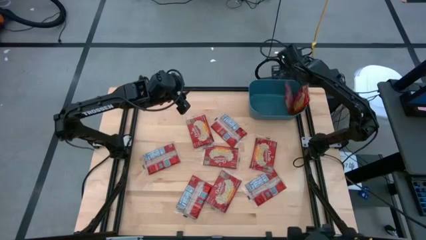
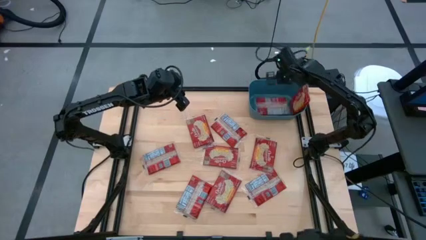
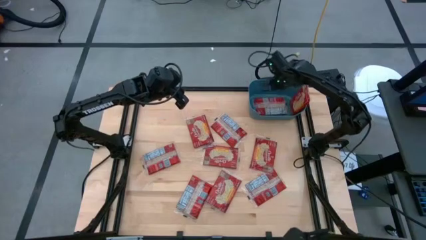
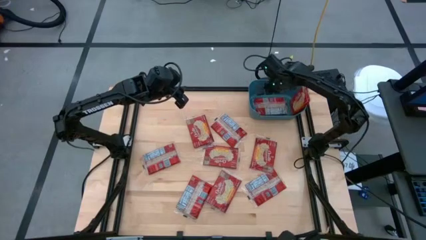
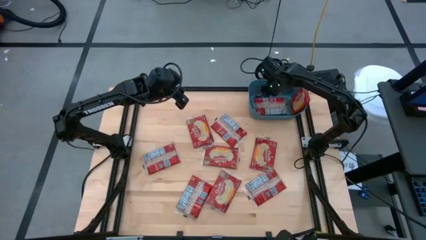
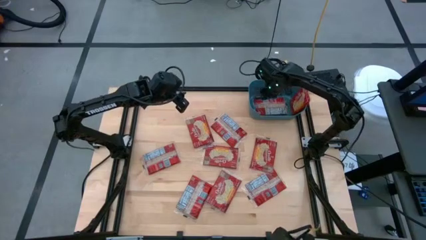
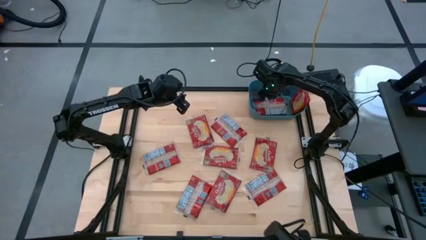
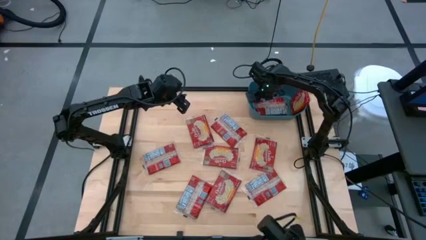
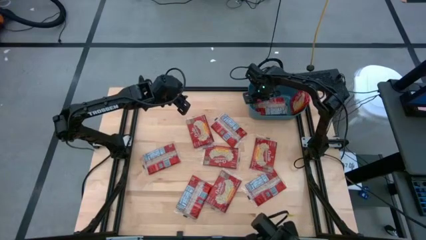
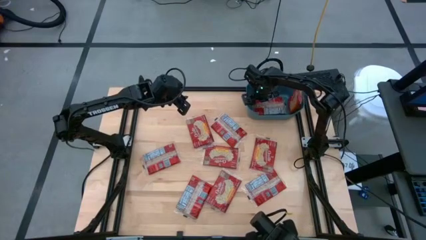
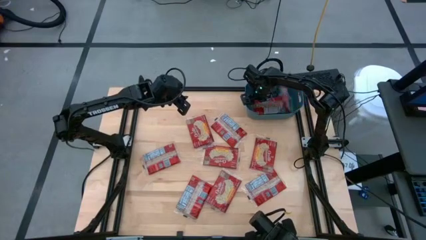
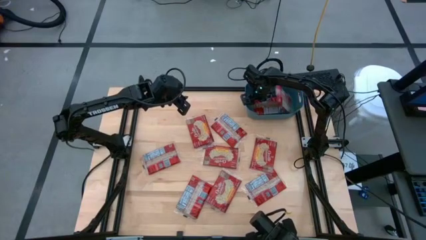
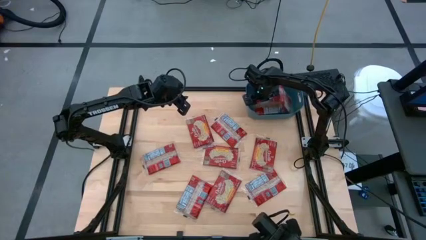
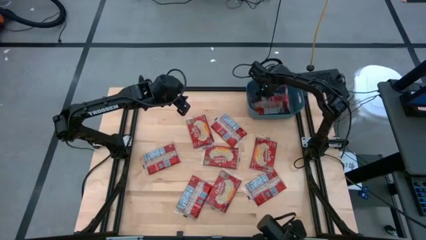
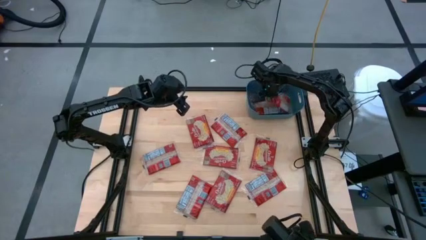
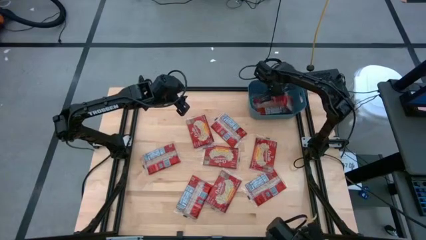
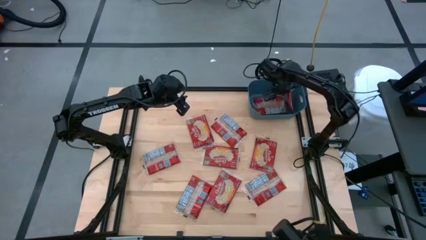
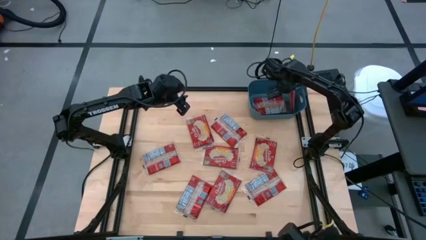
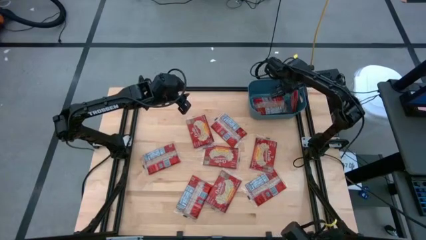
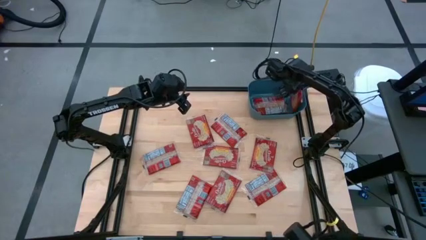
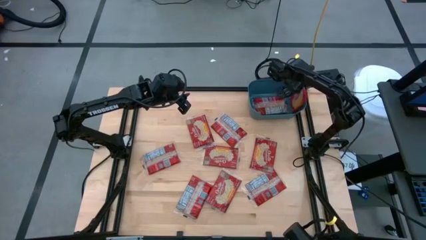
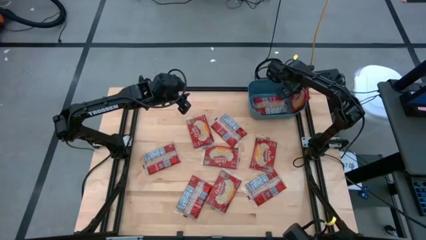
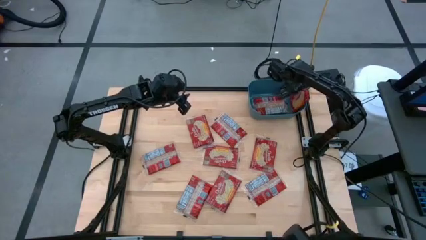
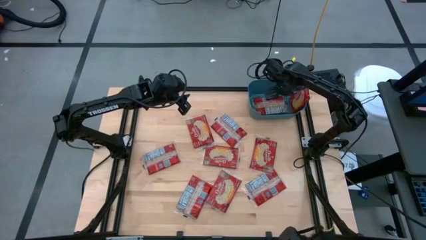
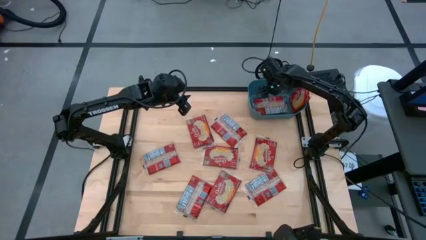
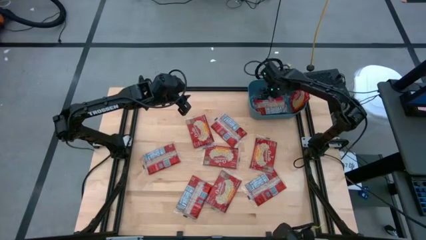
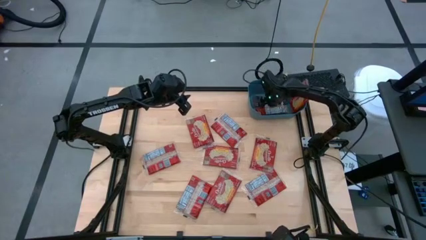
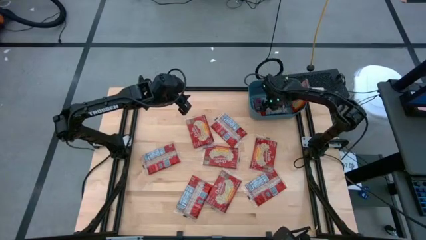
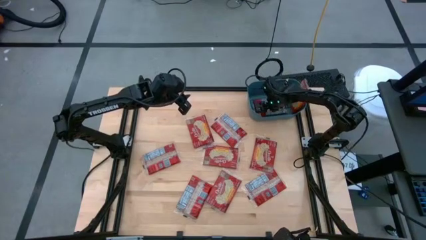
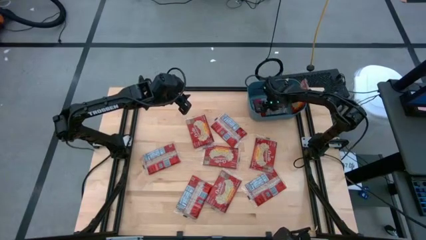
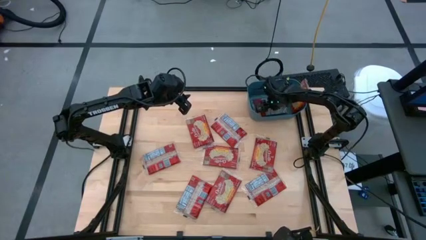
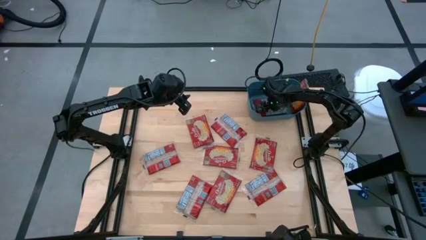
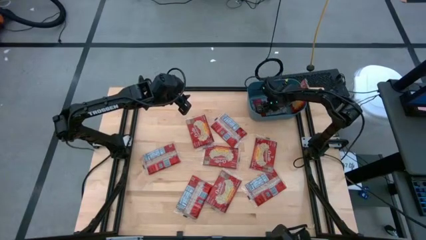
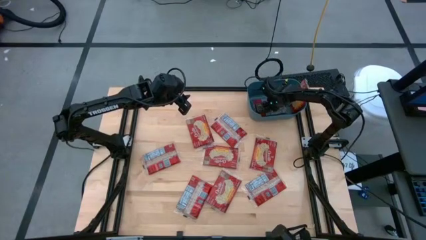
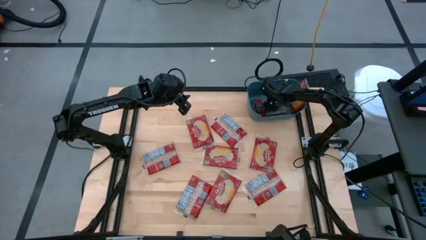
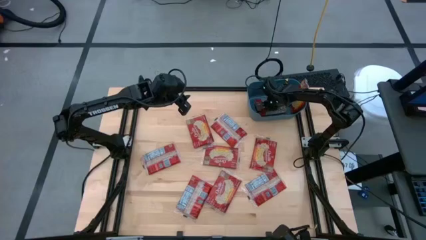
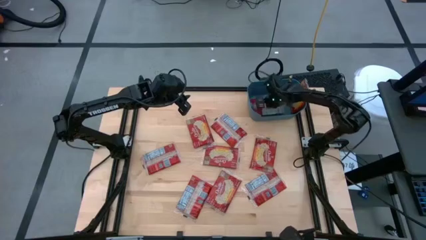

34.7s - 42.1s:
Task: Sort popcorn bags into baskets
Adjust the popcorn bag on the blue bin

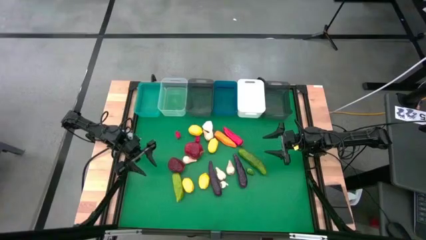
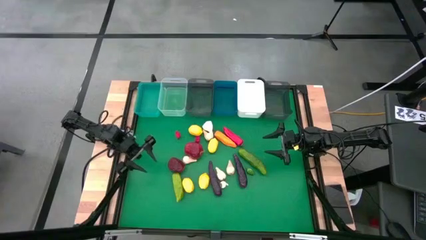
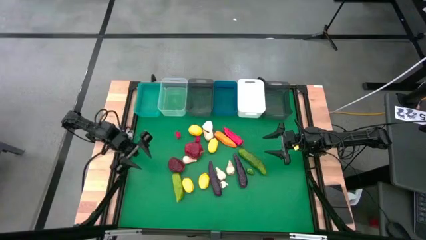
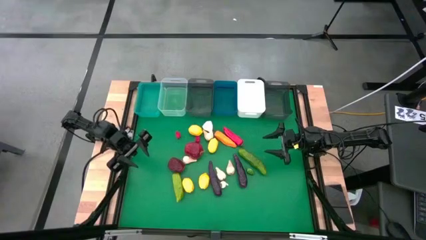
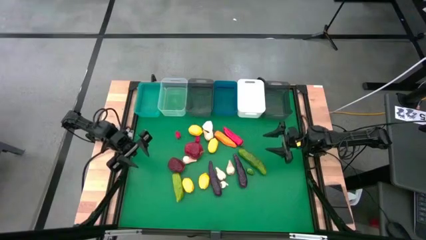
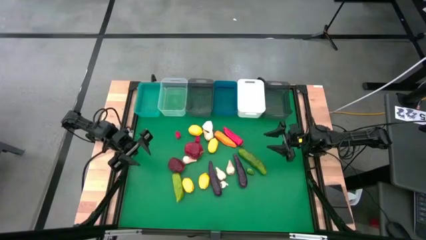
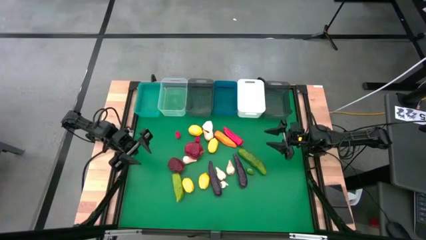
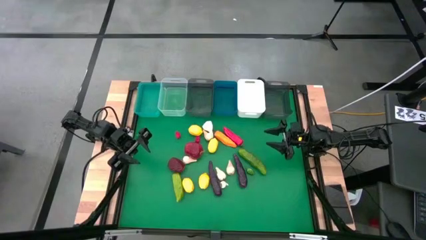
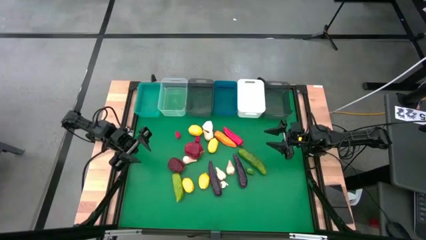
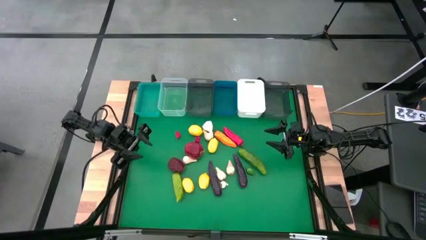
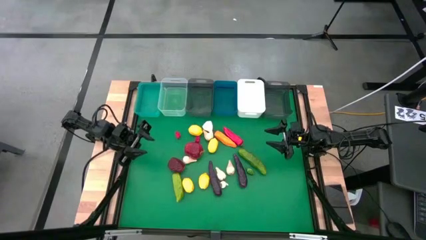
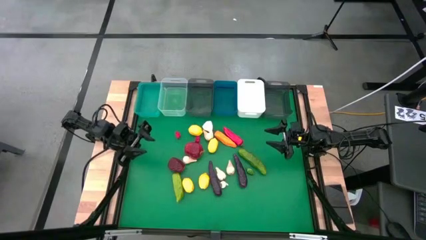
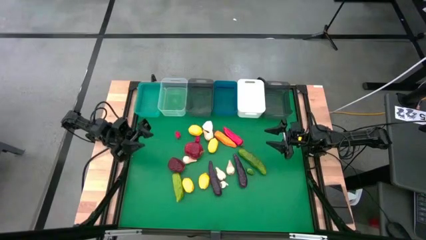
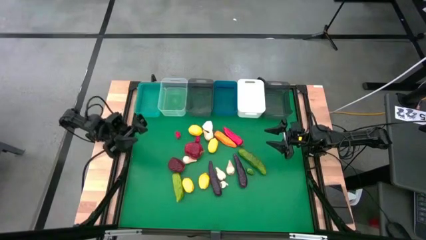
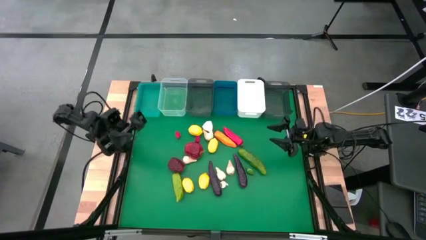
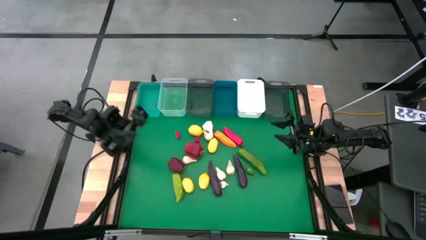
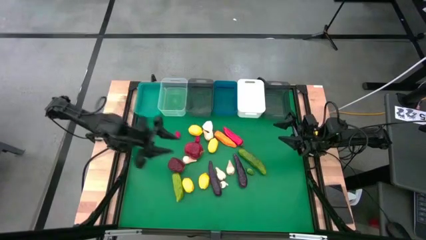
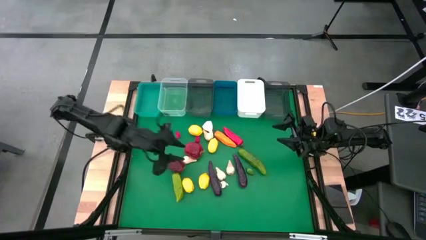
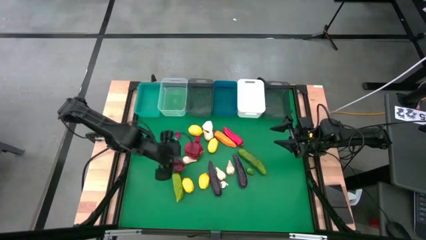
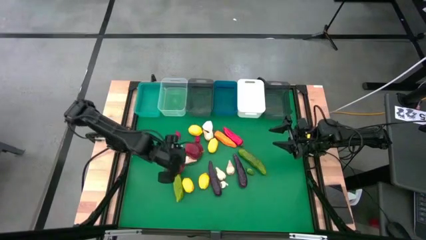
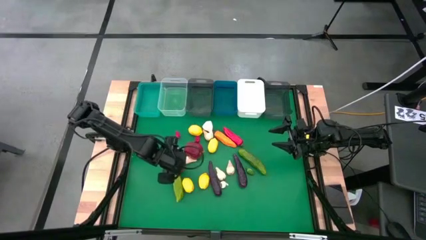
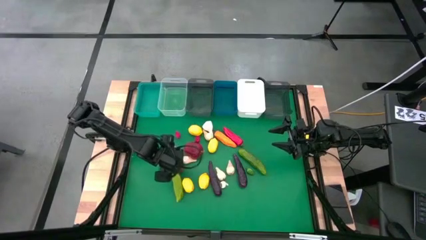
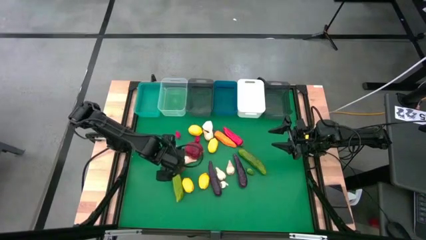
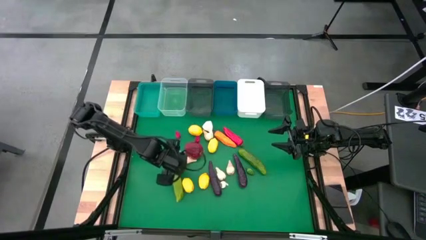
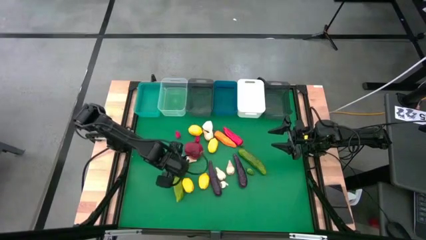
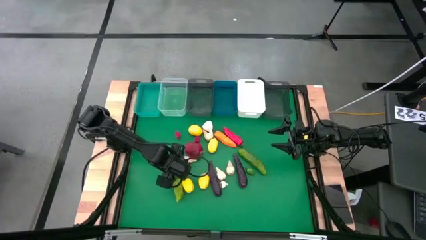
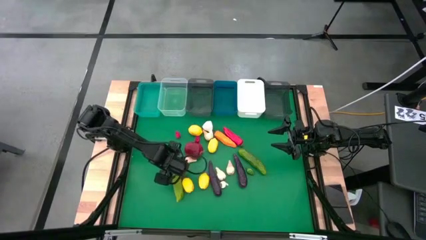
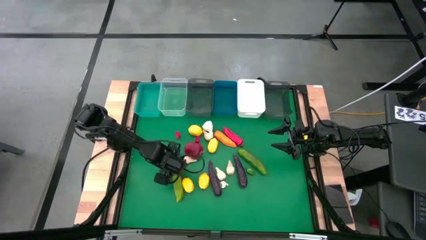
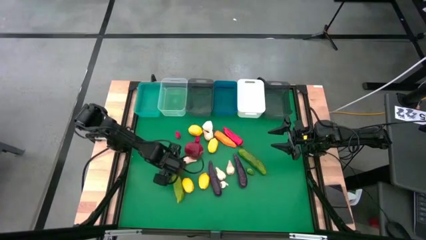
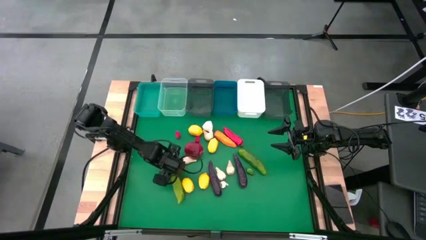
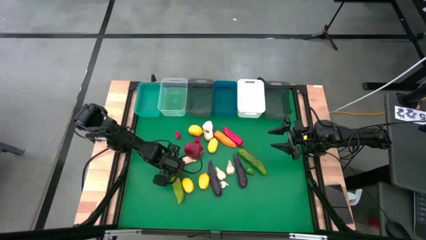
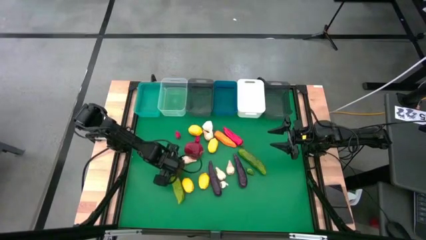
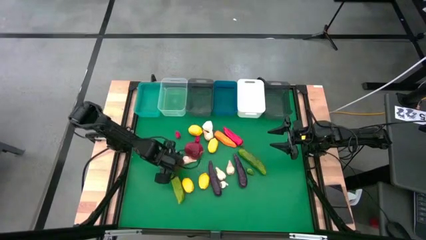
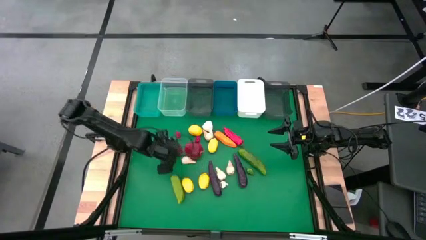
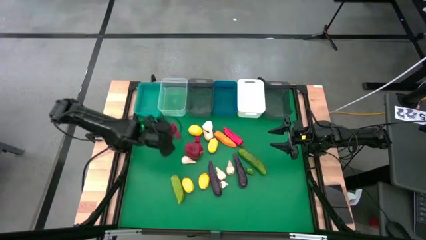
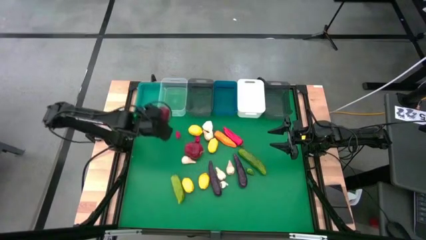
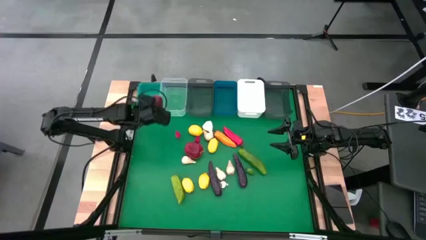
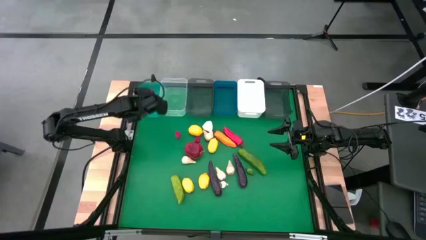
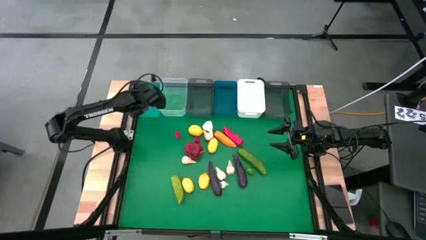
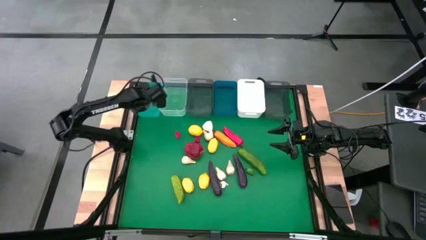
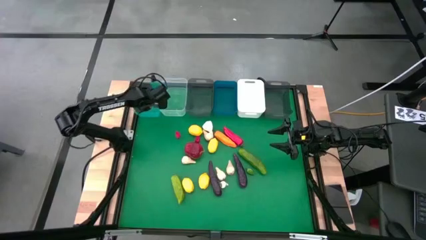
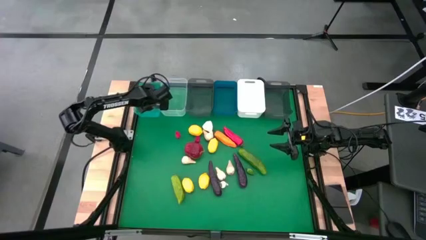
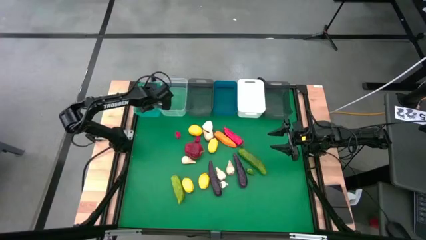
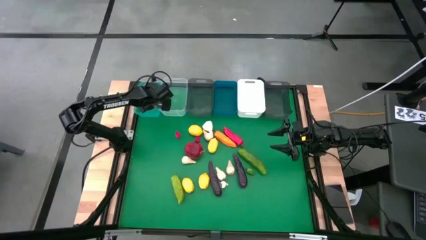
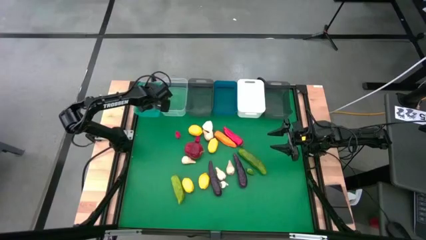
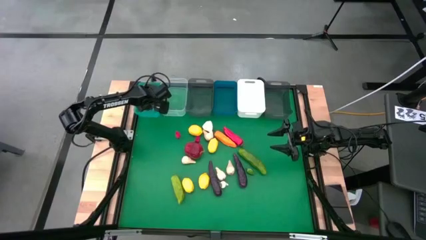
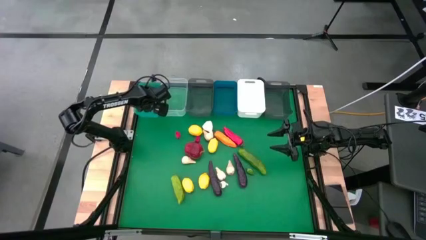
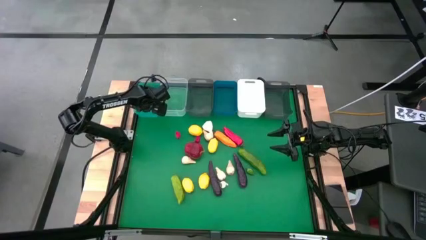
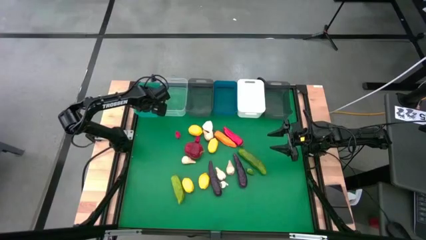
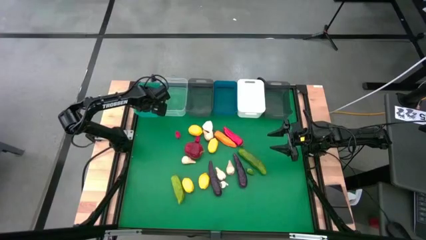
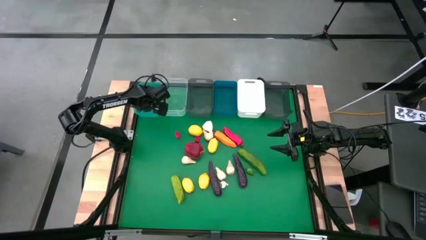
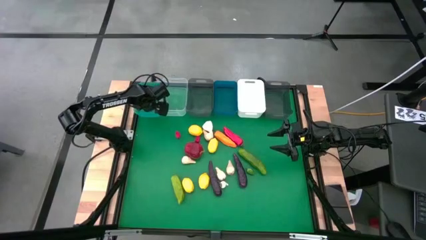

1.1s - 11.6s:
Task: Sort produce into baskets
Put the apple into the green bin
